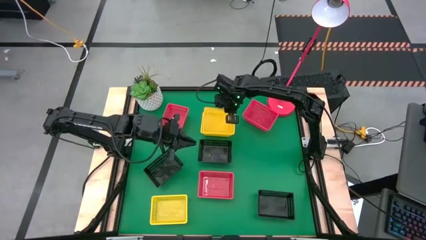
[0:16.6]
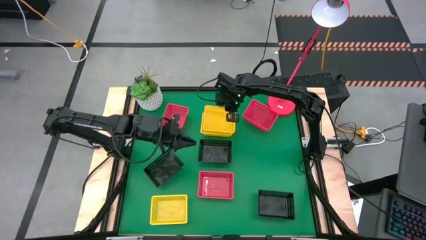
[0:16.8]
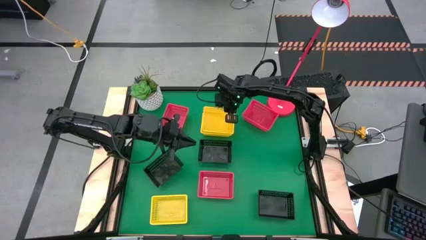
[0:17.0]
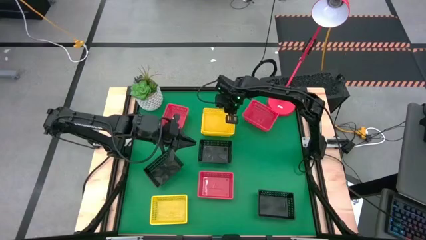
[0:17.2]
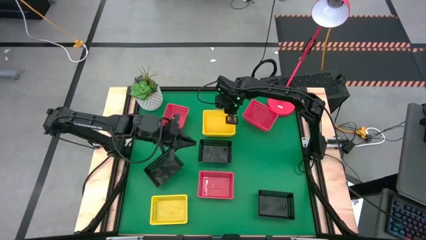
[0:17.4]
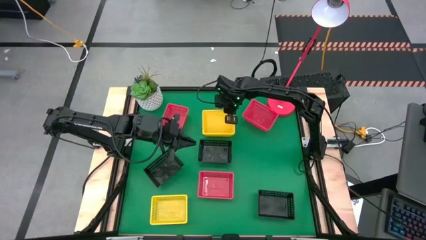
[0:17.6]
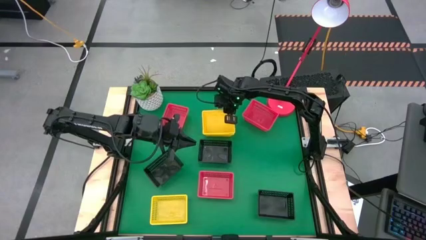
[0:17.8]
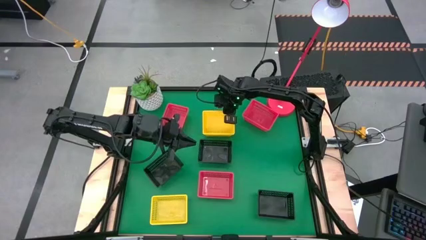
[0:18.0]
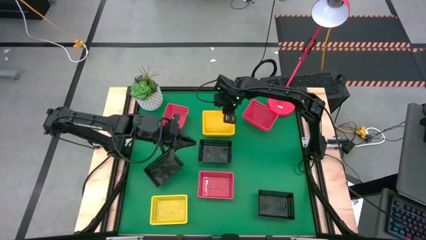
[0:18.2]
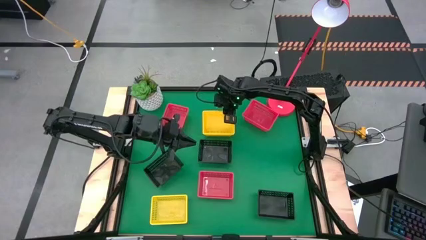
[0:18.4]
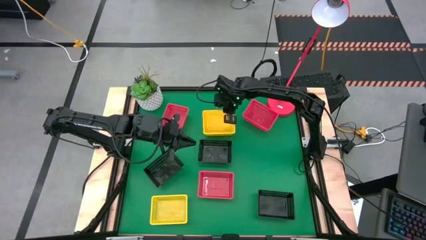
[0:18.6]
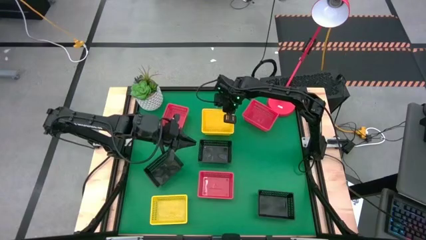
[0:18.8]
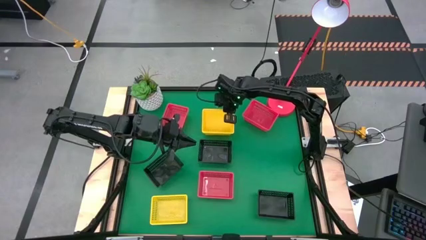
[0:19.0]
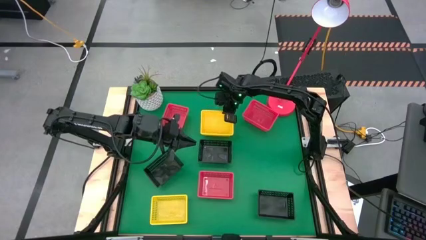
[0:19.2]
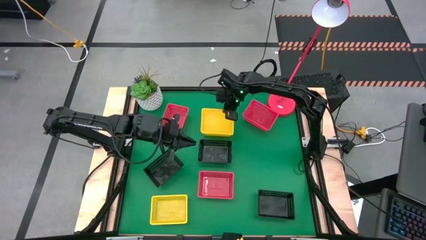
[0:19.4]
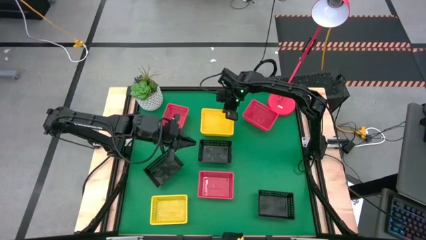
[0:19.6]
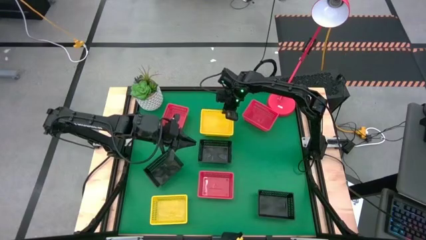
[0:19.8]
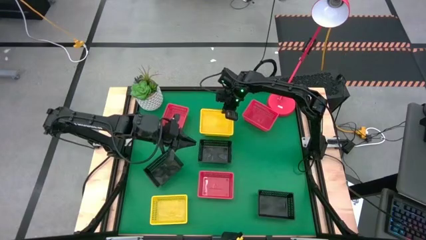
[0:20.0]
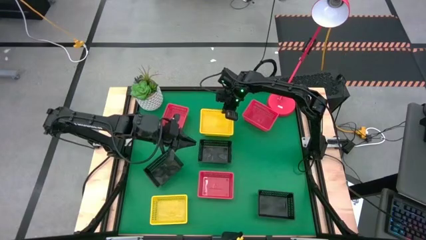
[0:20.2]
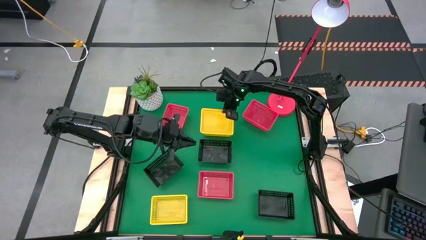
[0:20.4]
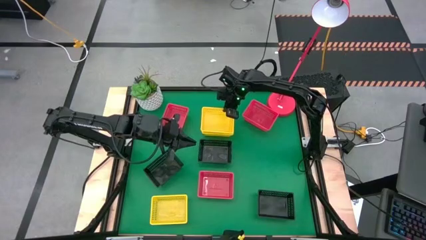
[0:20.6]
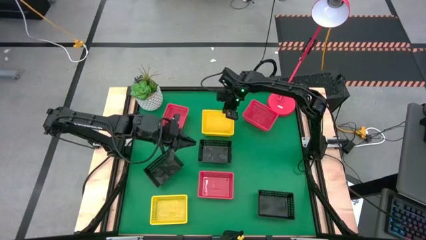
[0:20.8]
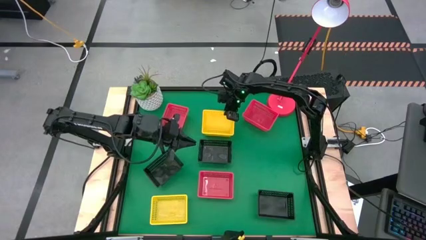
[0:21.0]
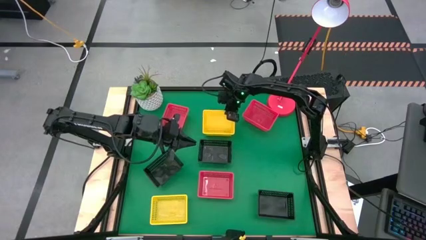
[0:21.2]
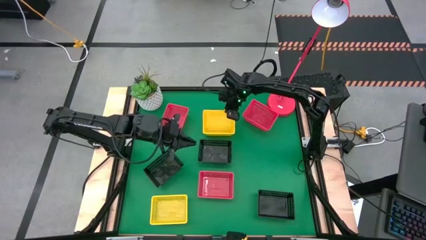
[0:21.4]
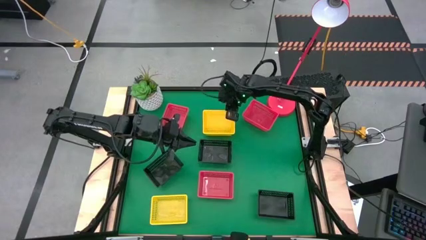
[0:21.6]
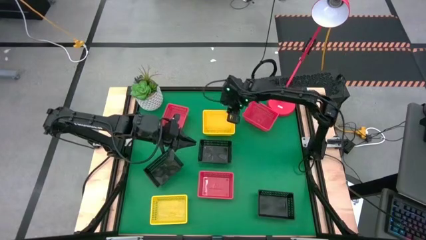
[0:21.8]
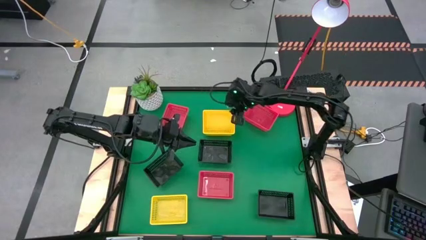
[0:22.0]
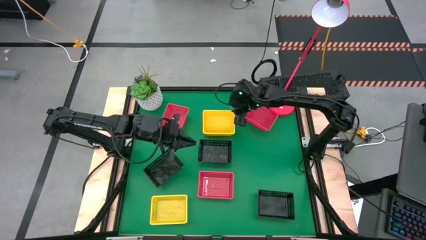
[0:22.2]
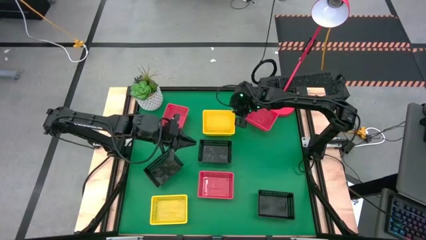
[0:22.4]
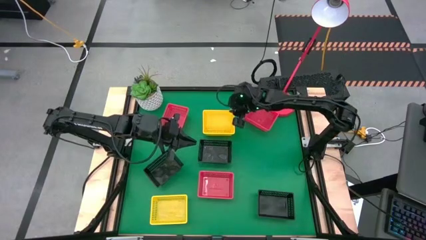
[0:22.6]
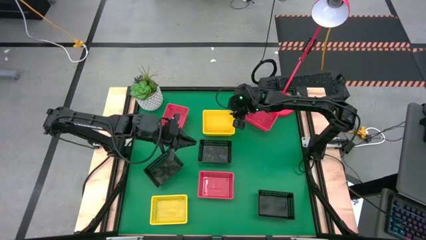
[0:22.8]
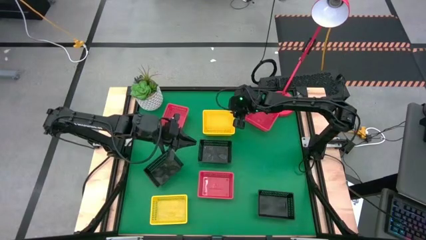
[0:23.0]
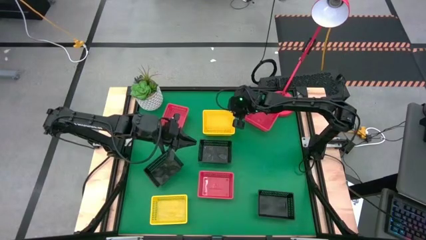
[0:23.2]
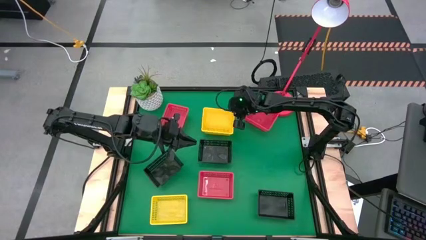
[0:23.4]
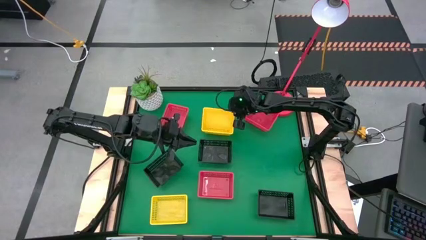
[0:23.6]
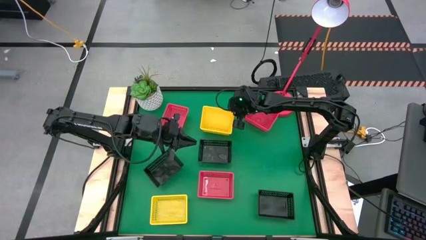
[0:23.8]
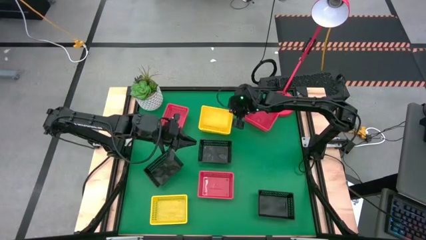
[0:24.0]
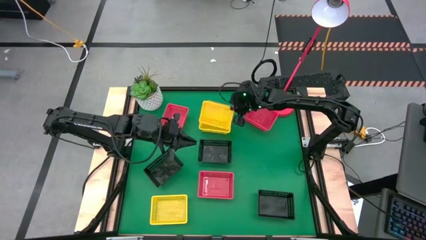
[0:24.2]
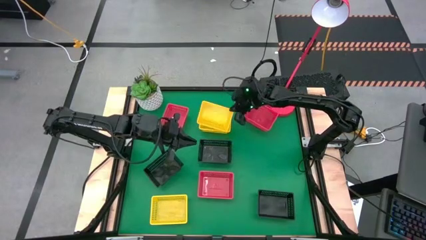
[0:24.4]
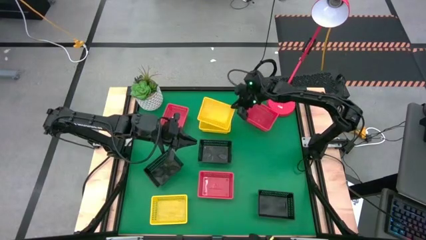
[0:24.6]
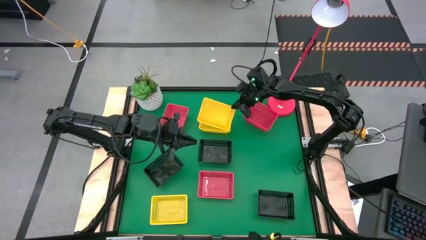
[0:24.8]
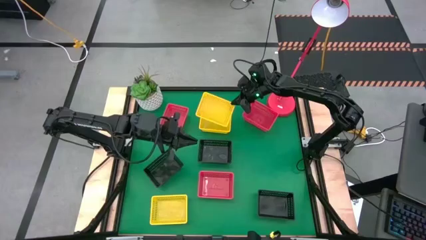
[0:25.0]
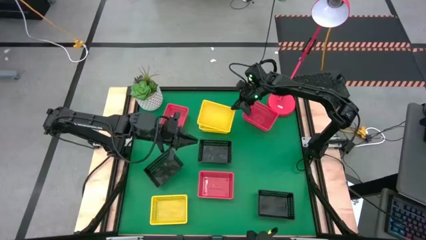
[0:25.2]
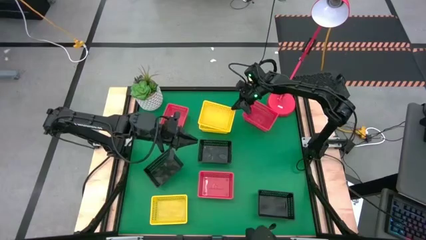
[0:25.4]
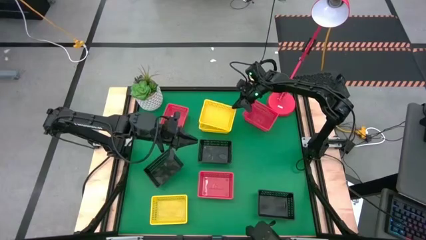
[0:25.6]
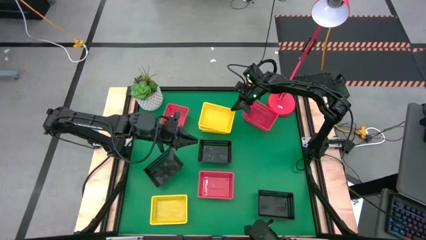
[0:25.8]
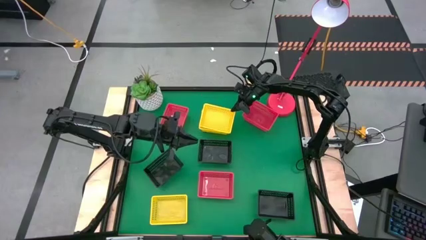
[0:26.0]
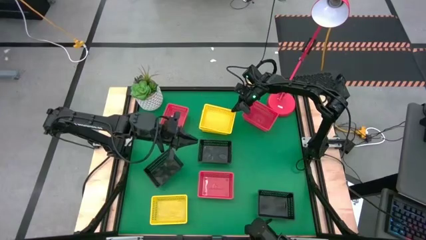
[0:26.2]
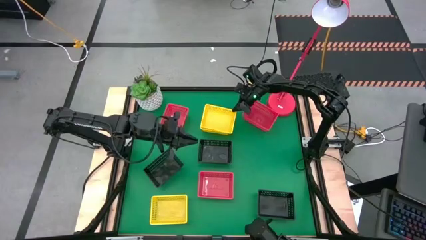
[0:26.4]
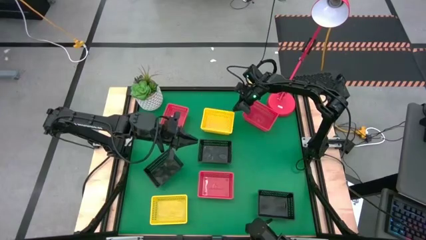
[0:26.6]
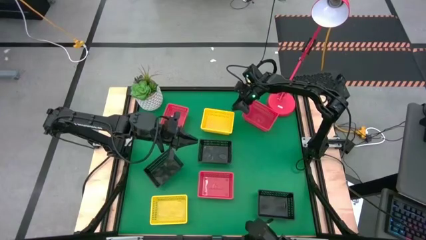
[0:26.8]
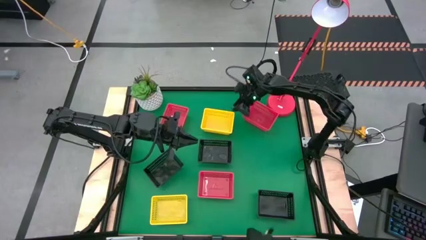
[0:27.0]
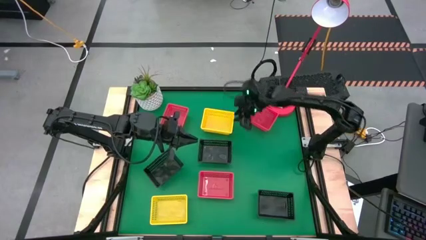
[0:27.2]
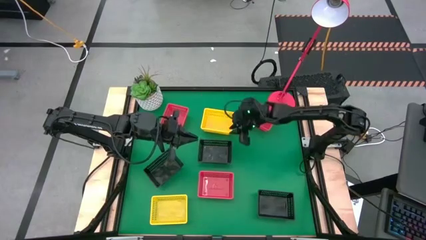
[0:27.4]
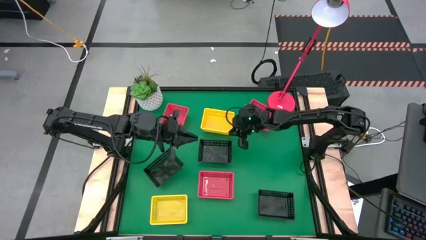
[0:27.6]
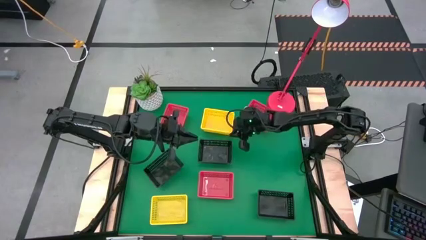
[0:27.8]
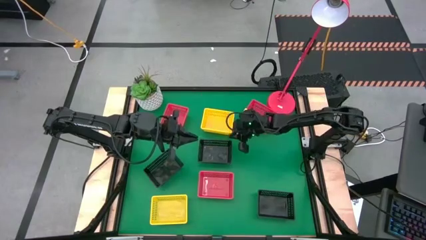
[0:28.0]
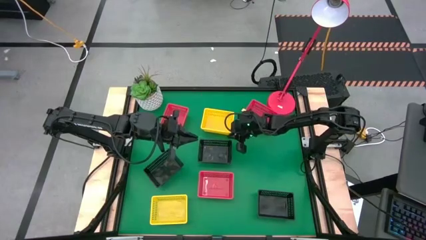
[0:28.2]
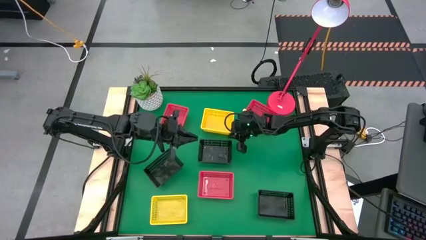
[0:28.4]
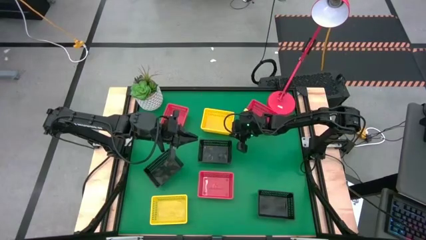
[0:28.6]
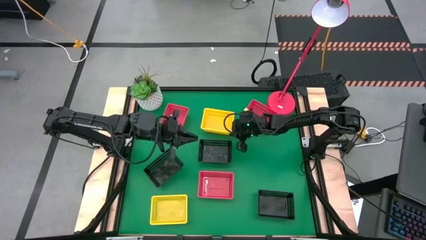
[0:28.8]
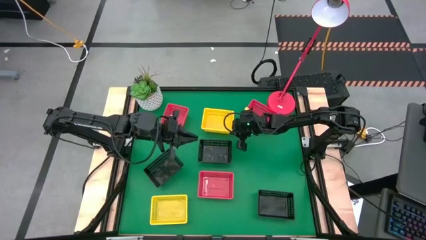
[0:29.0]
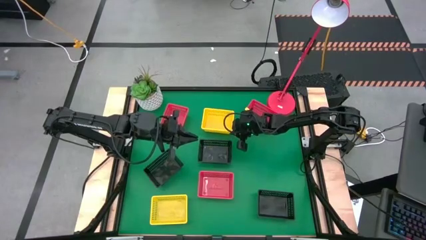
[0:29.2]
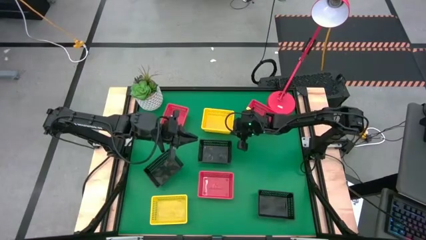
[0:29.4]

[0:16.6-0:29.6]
Stack the middle right yellow basket on the top yellow basket

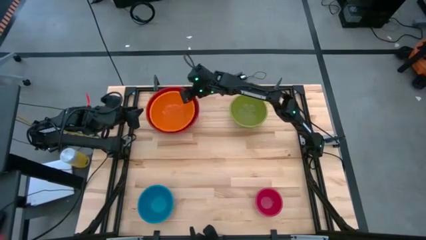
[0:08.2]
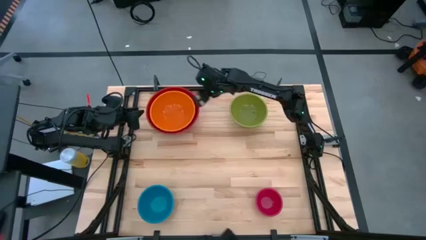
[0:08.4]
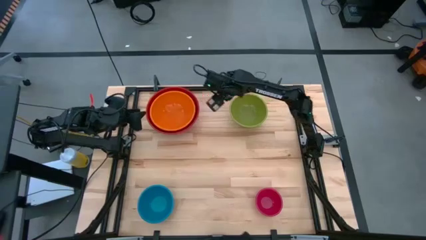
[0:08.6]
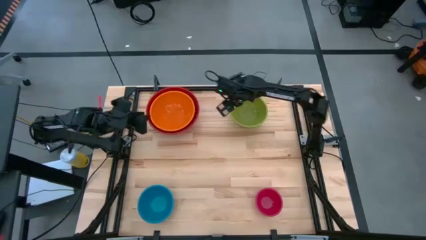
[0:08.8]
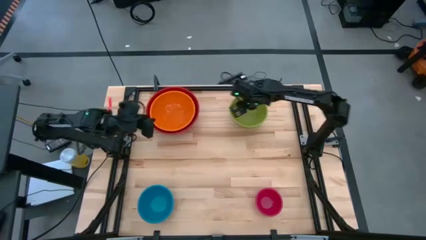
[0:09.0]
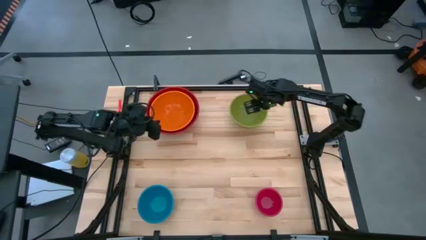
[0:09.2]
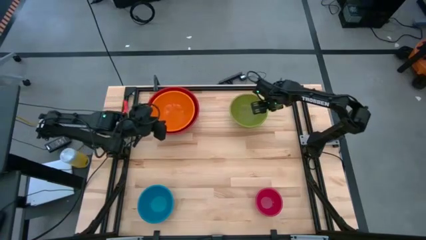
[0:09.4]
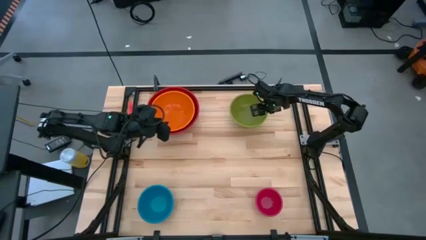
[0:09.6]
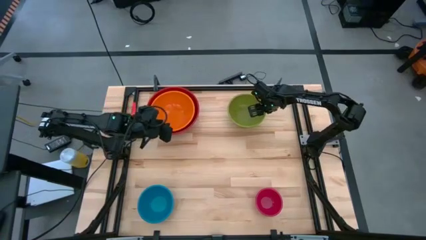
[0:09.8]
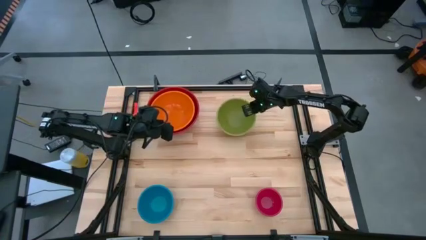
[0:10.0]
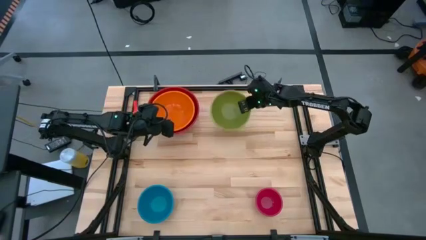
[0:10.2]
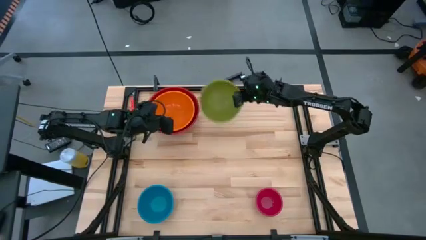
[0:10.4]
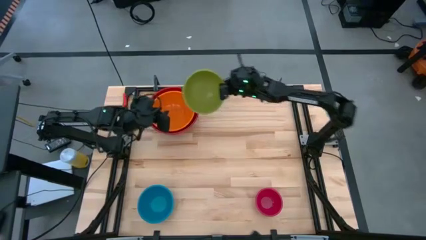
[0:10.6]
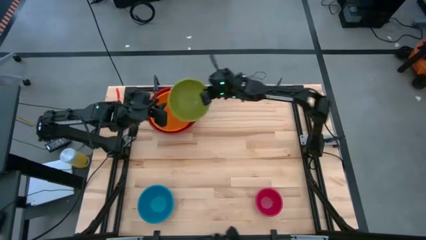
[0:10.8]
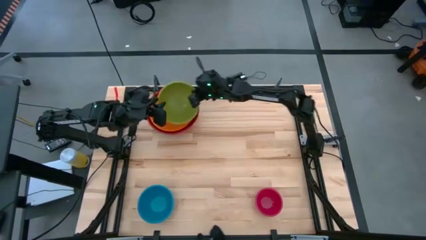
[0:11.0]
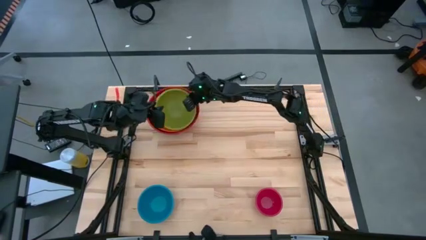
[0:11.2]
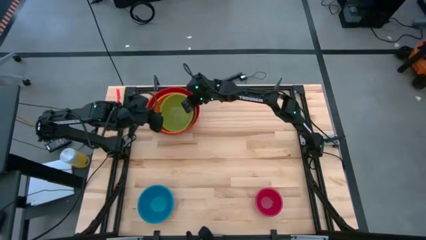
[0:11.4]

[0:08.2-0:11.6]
Stack the green bowl on the orange bowl
